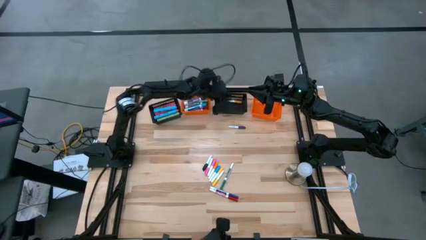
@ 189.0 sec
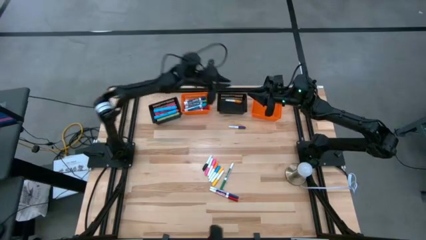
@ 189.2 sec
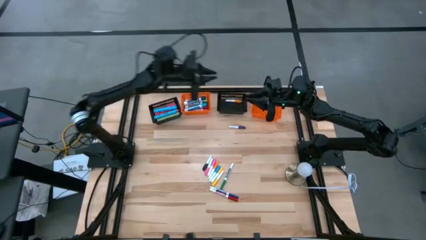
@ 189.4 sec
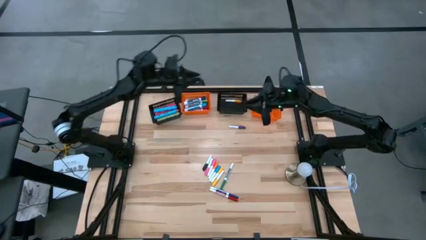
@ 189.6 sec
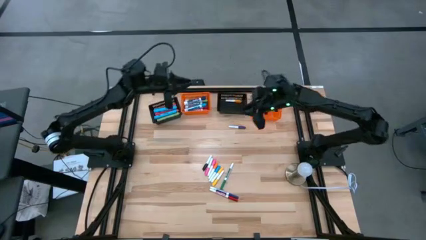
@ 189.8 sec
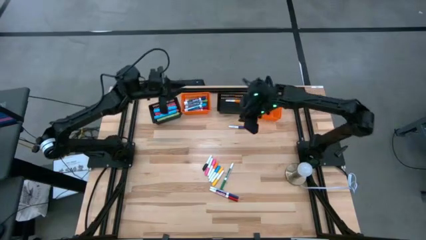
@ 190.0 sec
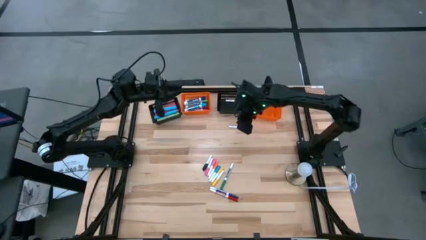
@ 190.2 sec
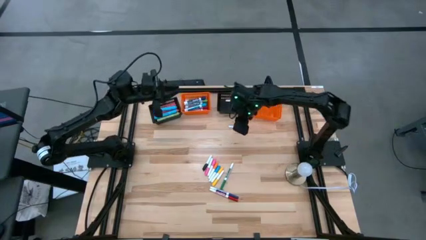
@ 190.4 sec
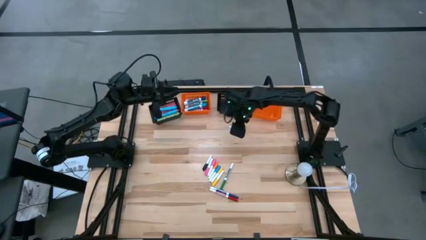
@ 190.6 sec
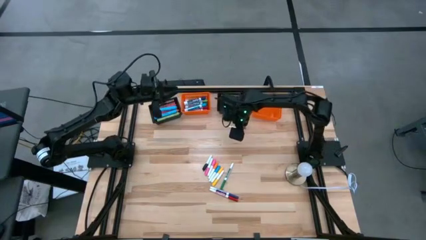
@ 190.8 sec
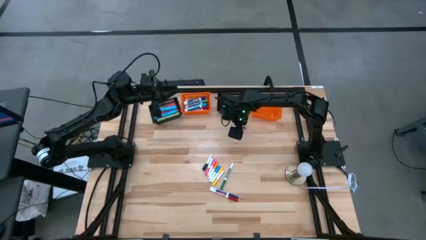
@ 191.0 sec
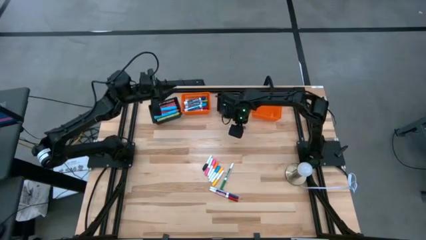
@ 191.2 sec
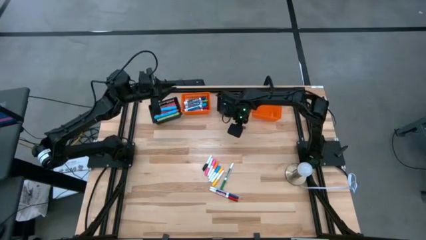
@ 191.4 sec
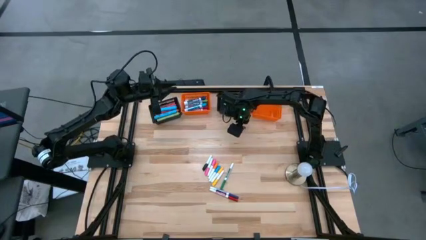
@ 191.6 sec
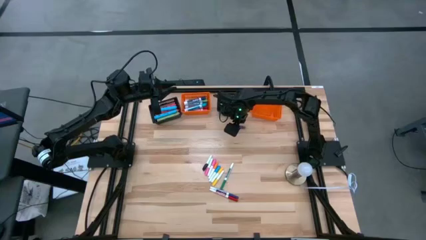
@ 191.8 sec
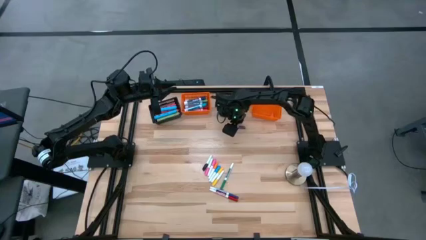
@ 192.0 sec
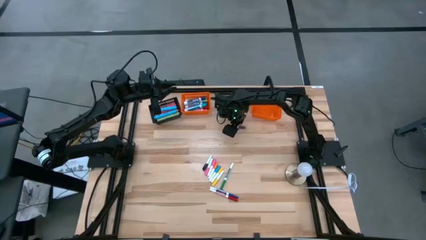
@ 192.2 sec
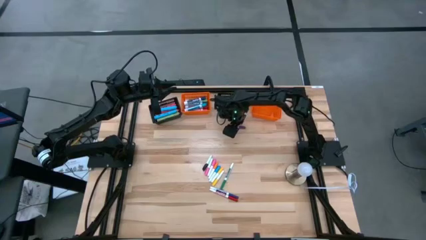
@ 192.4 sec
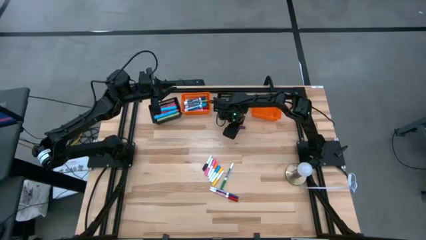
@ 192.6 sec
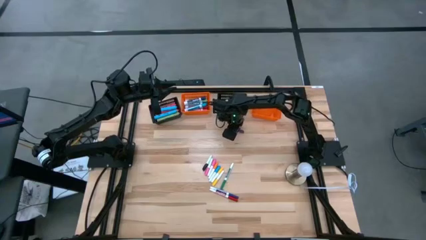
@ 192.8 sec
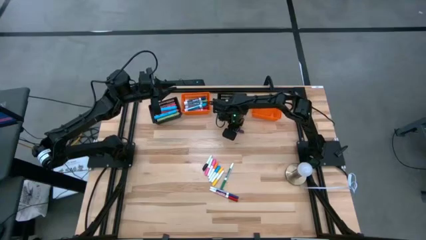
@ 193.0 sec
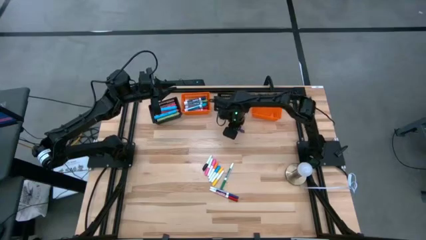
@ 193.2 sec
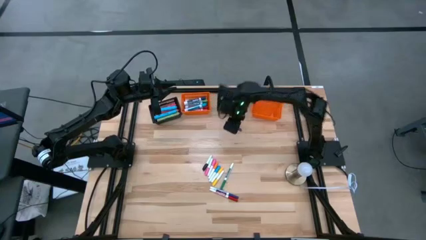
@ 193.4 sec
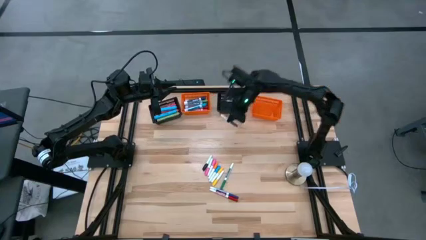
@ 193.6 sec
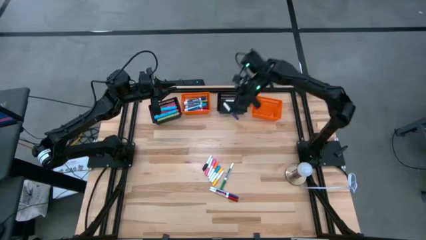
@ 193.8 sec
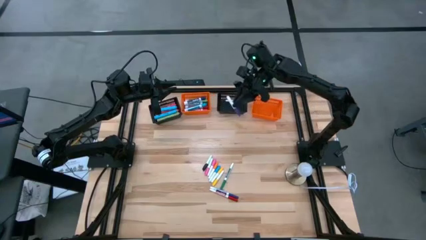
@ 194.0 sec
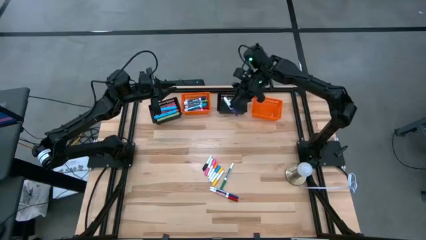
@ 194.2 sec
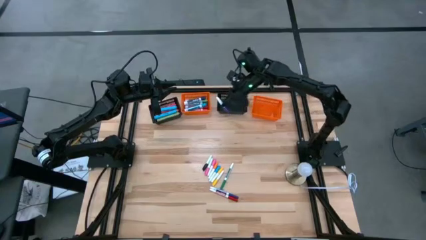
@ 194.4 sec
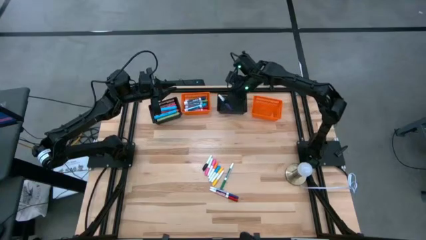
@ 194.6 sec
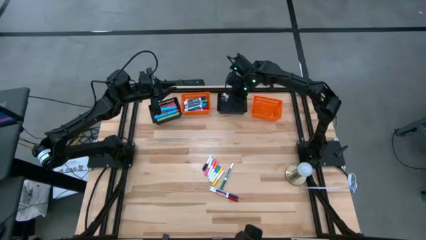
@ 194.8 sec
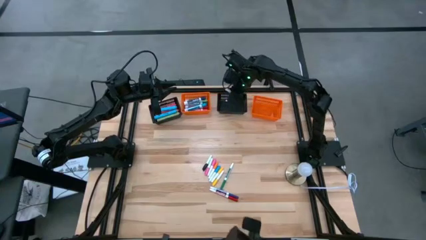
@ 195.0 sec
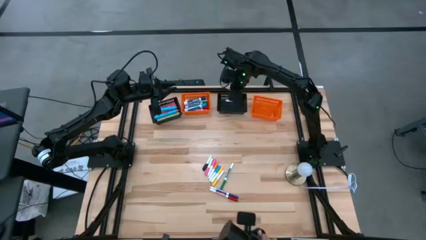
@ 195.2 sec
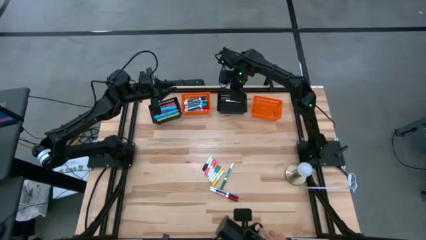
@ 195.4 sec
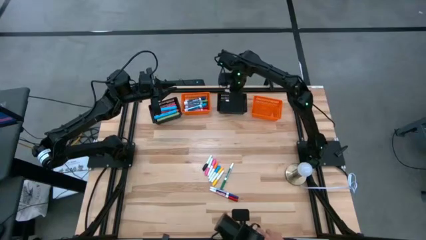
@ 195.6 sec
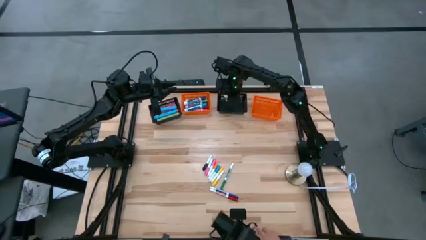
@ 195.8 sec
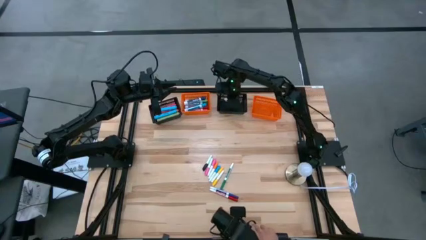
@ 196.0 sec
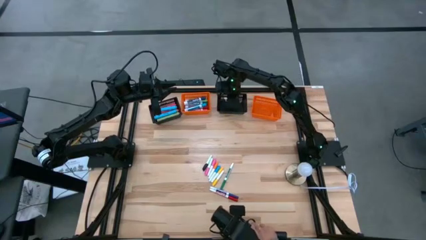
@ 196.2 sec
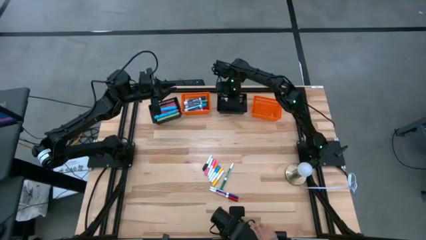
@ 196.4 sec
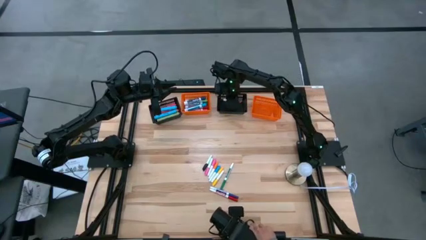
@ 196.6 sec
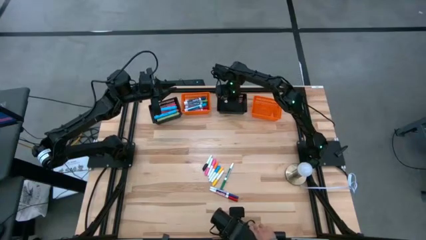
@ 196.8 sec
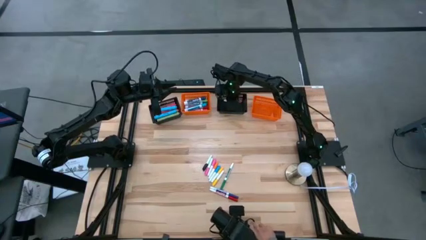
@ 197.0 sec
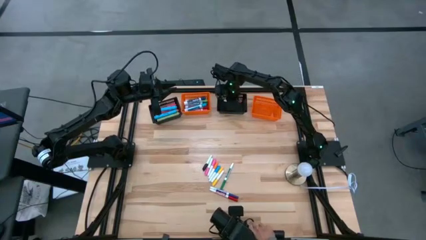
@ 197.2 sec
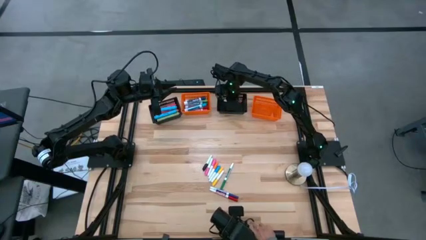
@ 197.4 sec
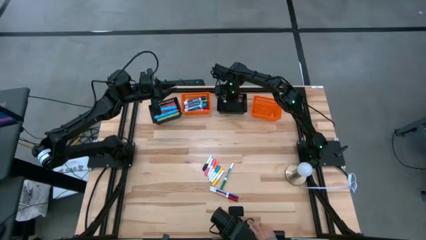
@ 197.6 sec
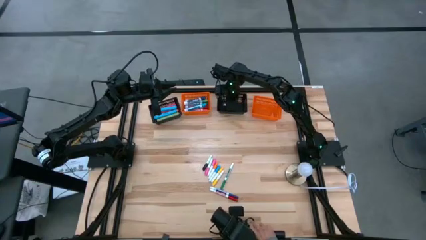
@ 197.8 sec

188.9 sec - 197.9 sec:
Task: Pick & Place Markers
Put the purple mini highlighter into the right black bin

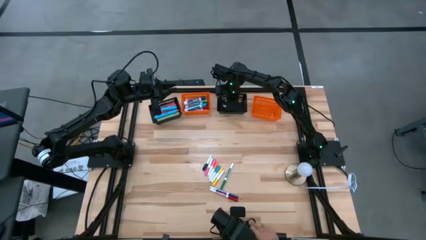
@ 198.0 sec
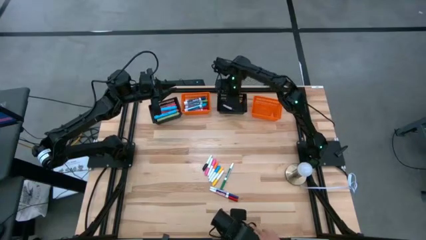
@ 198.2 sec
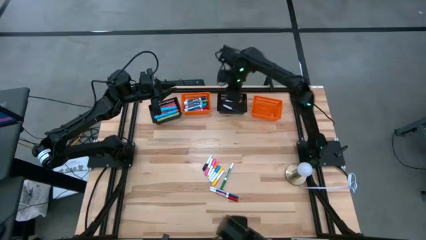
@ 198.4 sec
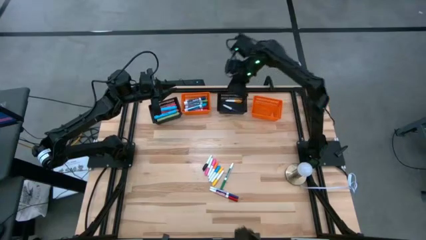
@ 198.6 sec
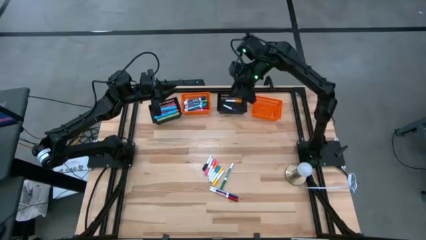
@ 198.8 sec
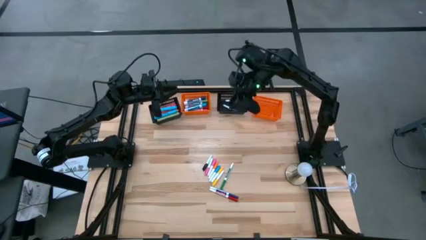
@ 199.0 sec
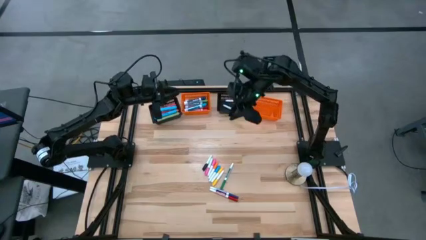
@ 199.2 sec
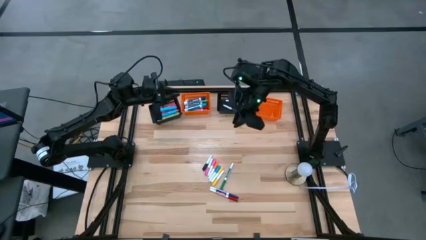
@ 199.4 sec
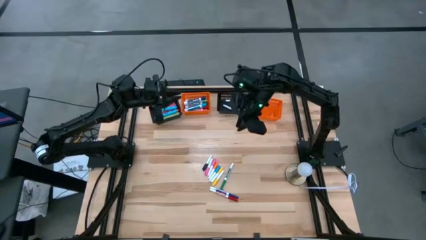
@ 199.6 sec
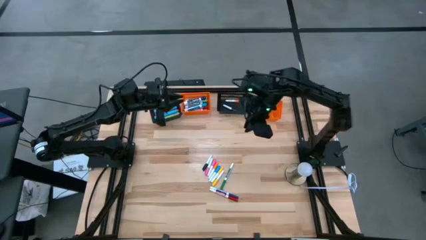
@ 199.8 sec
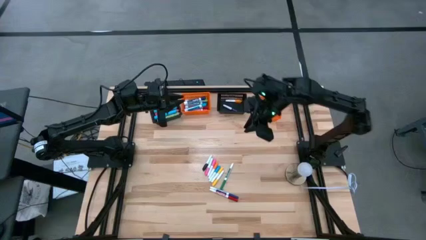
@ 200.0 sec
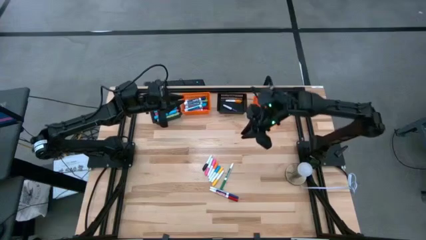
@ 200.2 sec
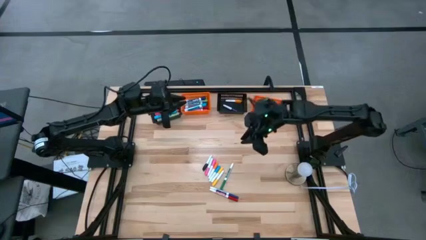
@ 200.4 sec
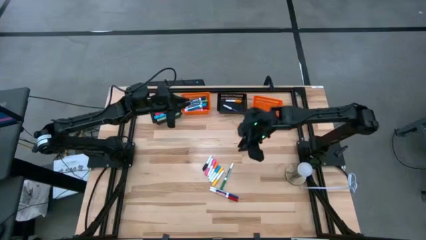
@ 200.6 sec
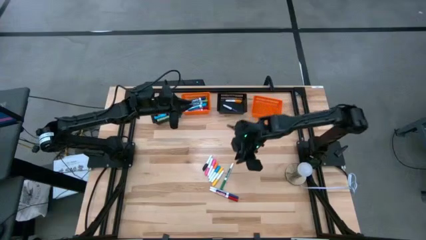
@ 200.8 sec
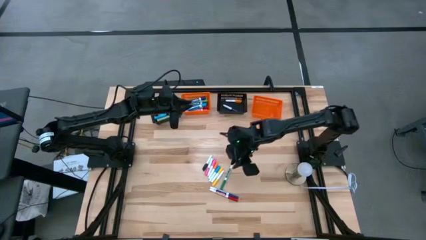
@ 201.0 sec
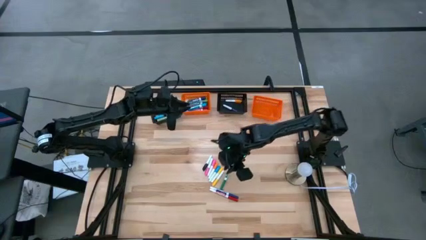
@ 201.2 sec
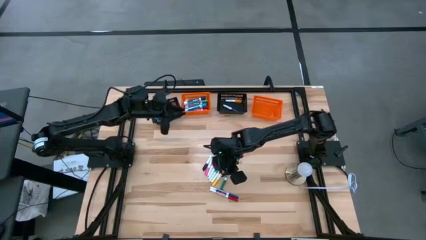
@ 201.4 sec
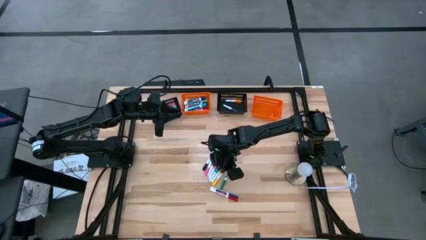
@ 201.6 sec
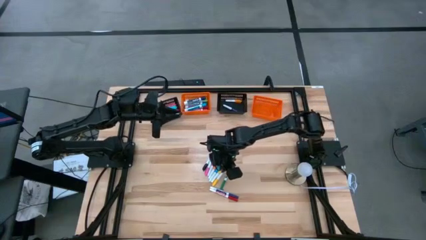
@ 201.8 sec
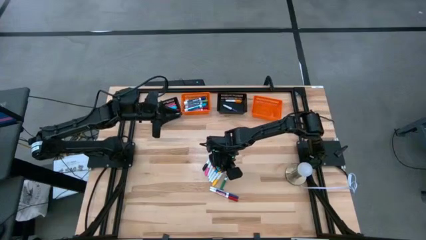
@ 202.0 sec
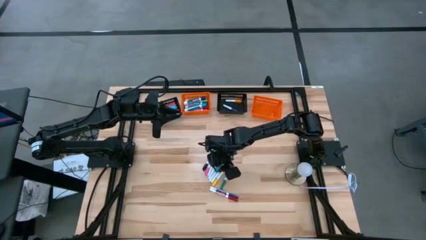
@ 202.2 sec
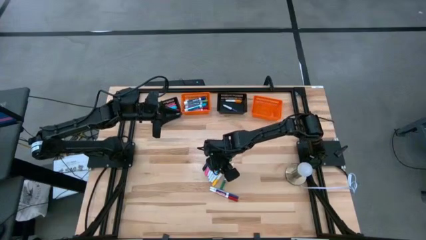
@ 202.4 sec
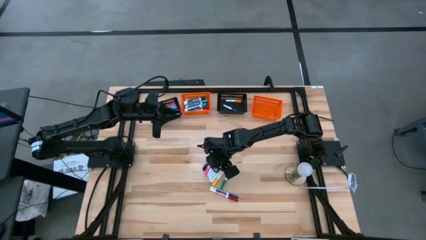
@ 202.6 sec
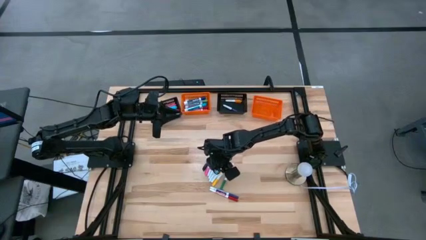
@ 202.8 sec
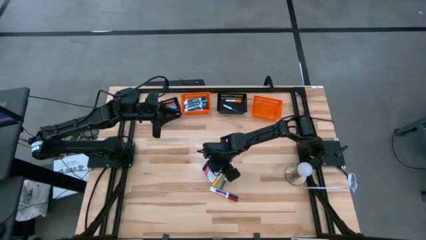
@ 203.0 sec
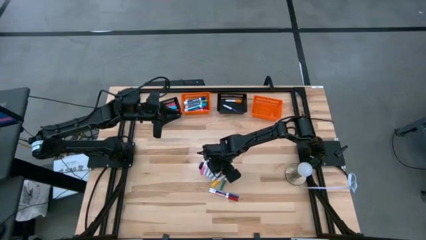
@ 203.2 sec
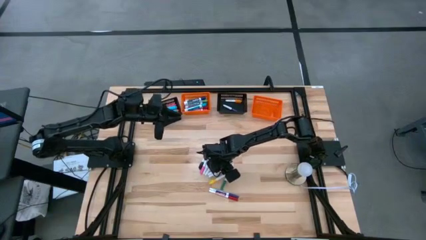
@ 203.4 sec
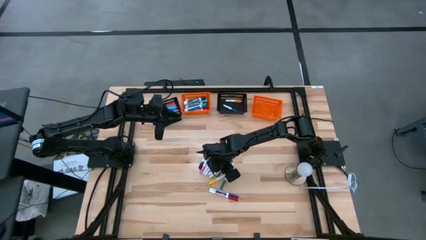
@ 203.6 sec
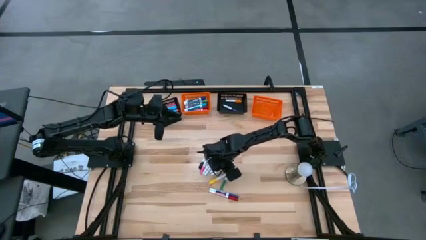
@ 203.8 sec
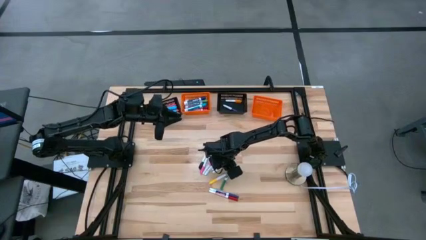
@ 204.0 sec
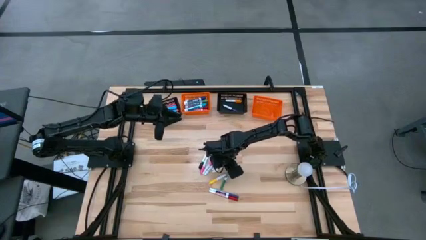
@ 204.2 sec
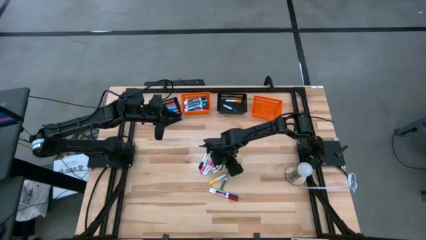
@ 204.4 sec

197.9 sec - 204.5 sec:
Put the light blue mini highlighter into the right black bin

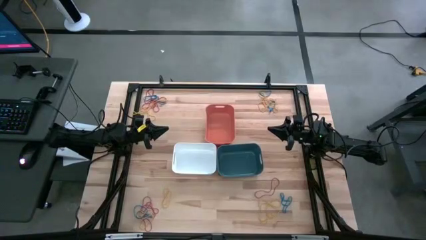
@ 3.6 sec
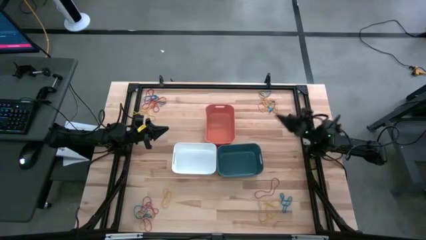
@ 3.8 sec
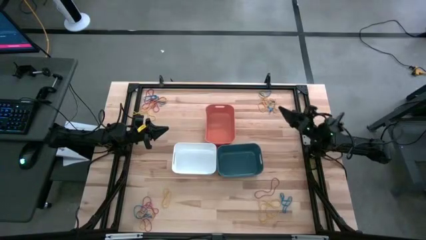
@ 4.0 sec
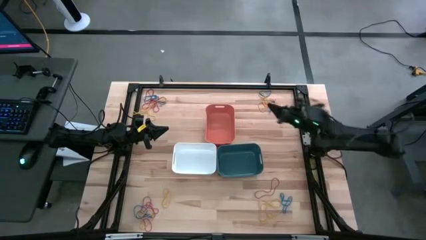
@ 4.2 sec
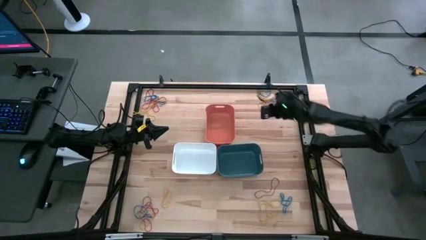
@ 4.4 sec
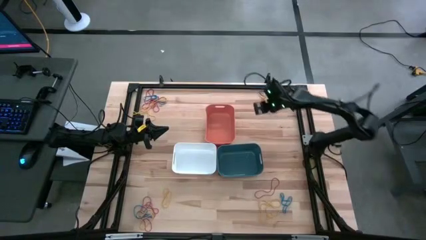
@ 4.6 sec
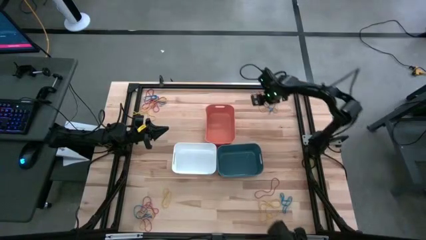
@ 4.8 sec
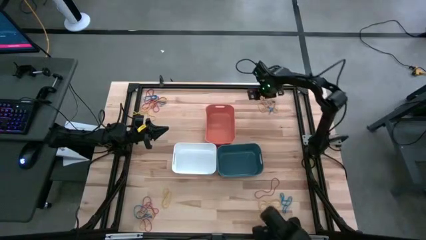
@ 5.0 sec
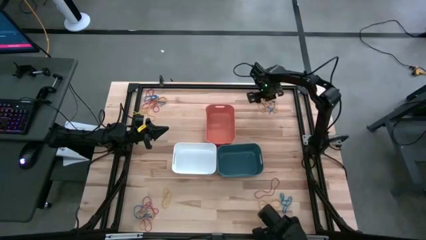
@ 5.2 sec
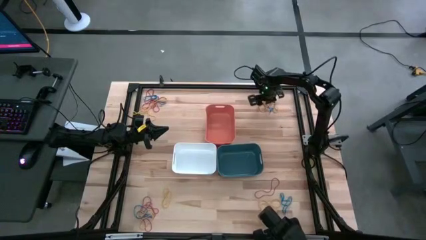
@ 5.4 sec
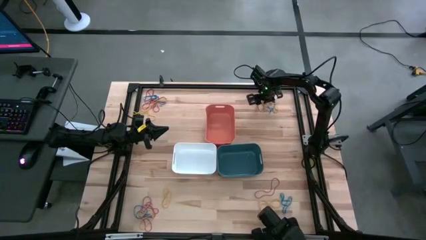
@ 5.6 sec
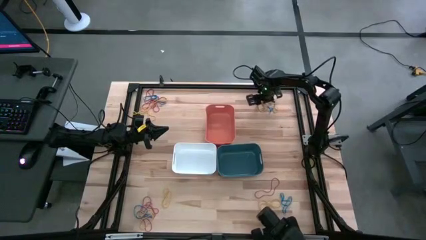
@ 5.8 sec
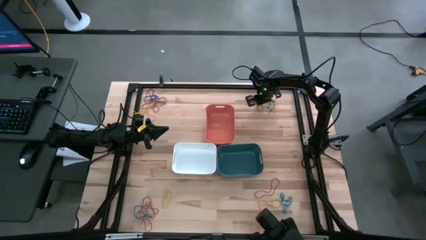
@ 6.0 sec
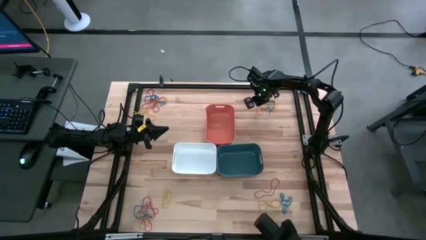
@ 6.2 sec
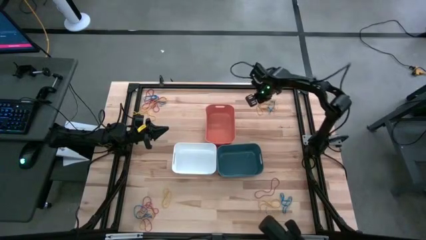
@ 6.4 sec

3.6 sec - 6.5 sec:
Task: Sort rubber bands into baskets
Put the yellow rubber band into the white bin
